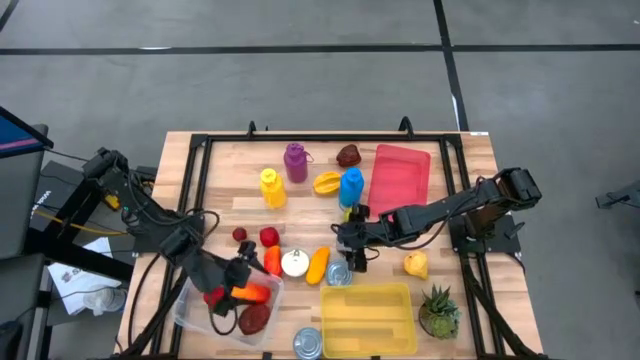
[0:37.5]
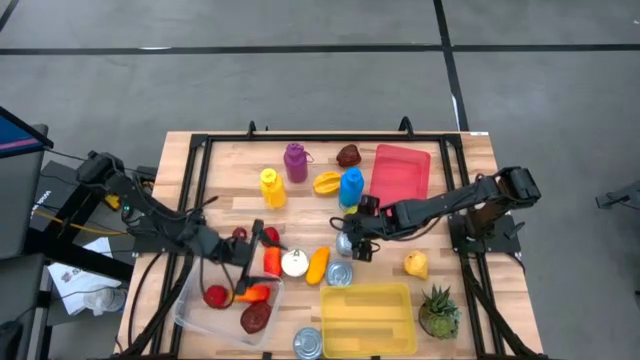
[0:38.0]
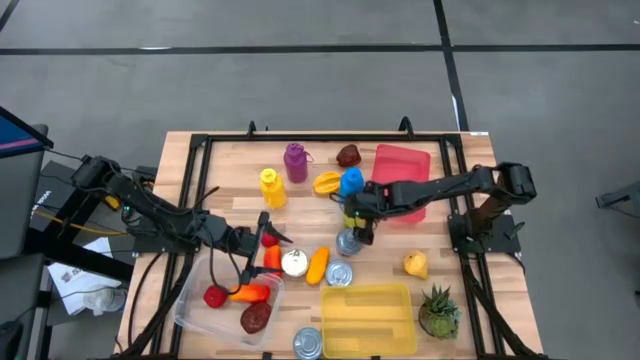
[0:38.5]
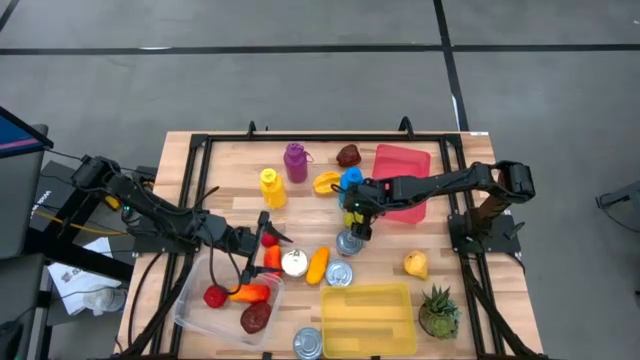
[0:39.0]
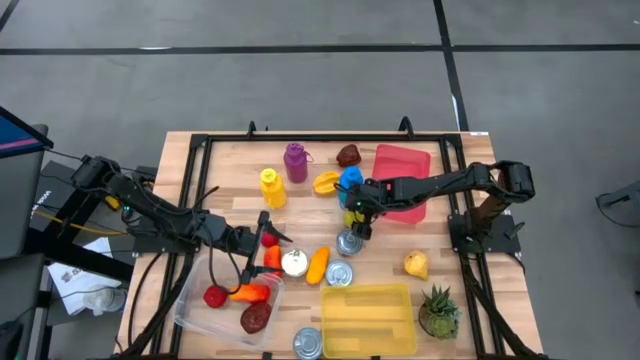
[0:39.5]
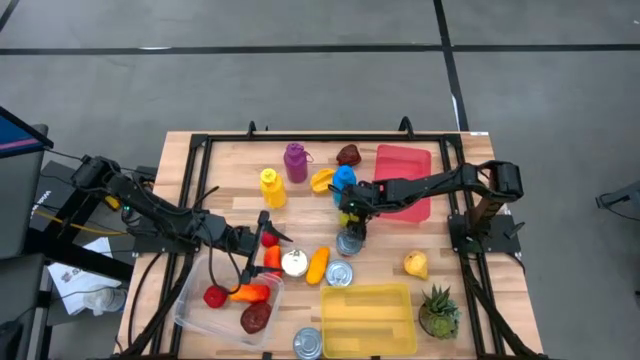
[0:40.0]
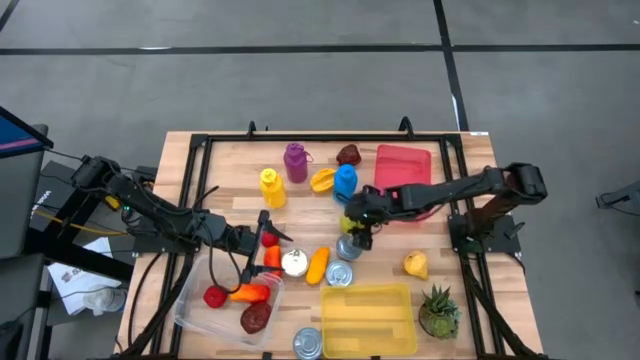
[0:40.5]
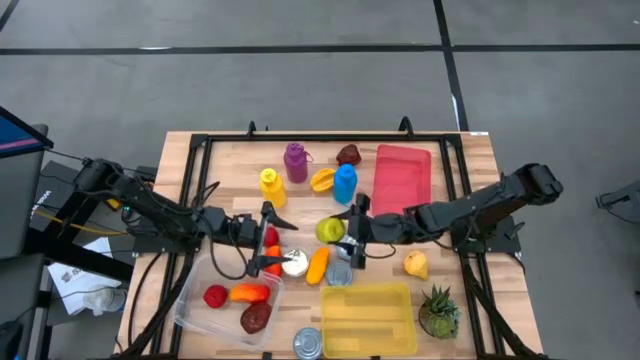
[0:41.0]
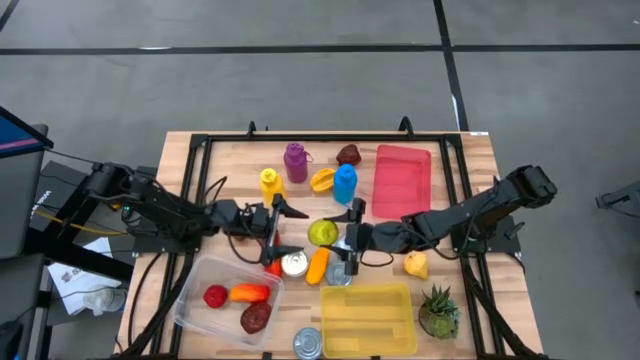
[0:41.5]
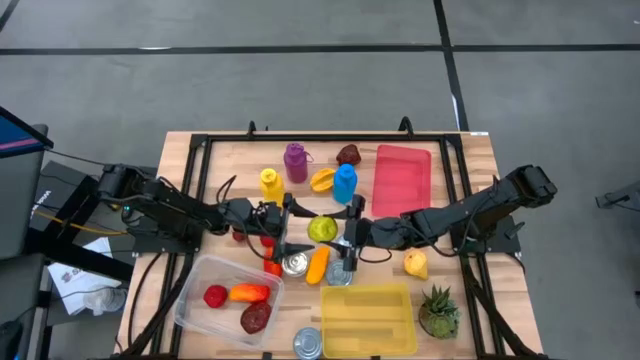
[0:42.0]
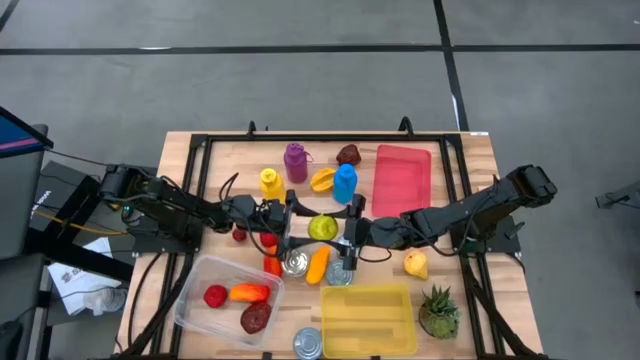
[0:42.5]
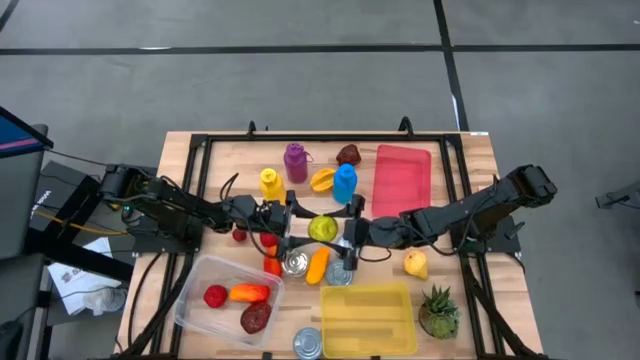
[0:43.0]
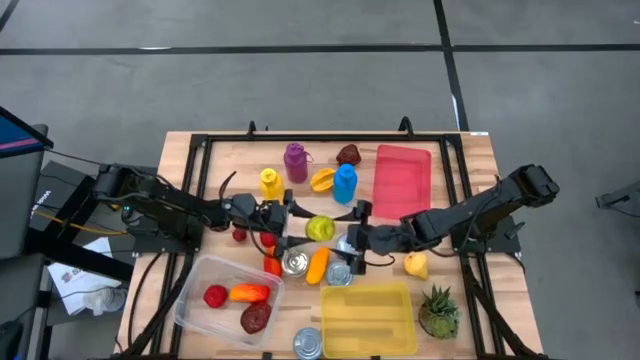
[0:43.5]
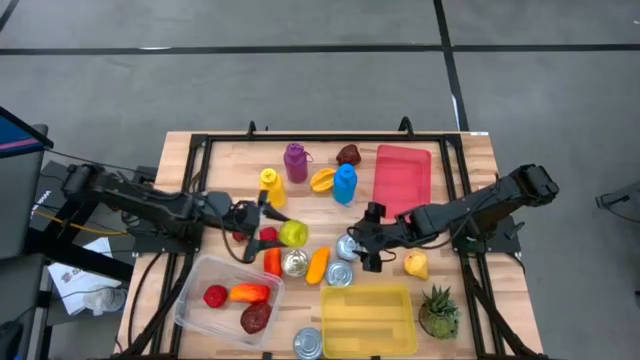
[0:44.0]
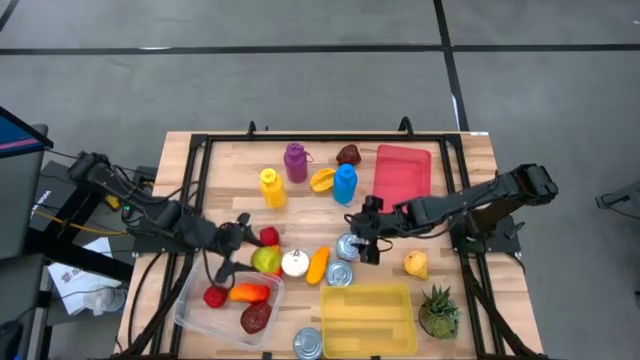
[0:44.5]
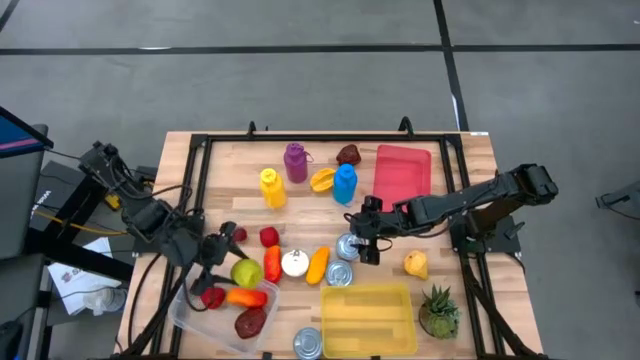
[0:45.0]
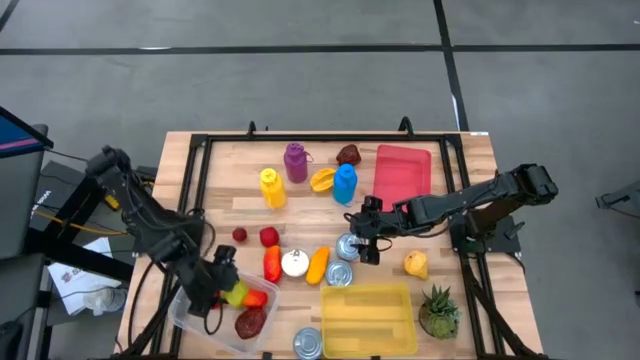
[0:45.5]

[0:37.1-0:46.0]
Task: Pick & Place Food Item
Put the green apple into the transparent bin

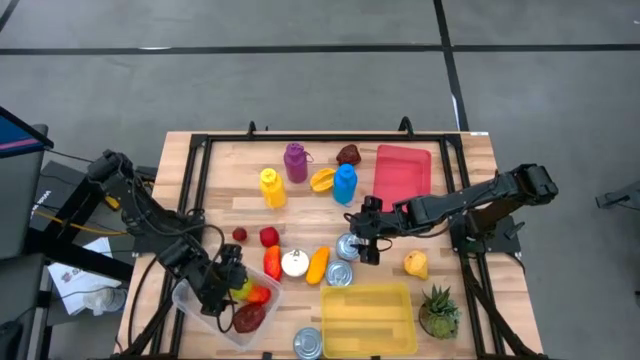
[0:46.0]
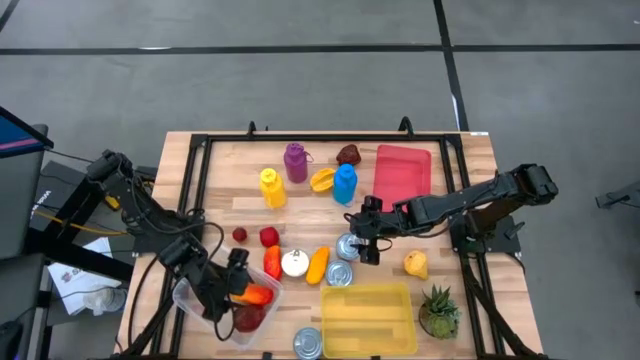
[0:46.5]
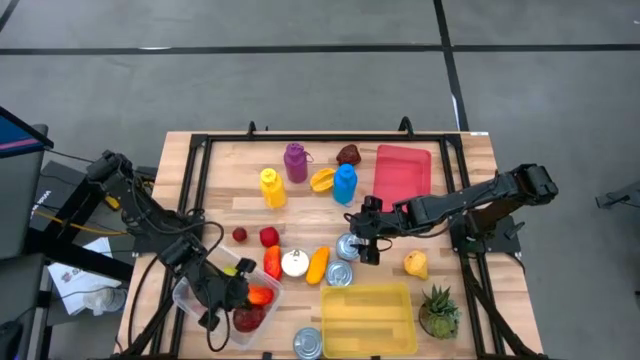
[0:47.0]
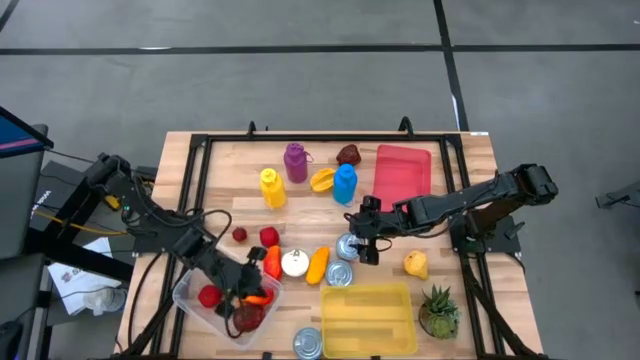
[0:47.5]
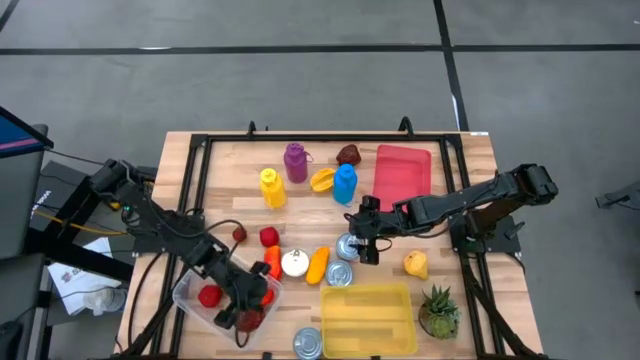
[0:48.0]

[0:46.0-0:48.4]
Adjust the transparent bin on the table

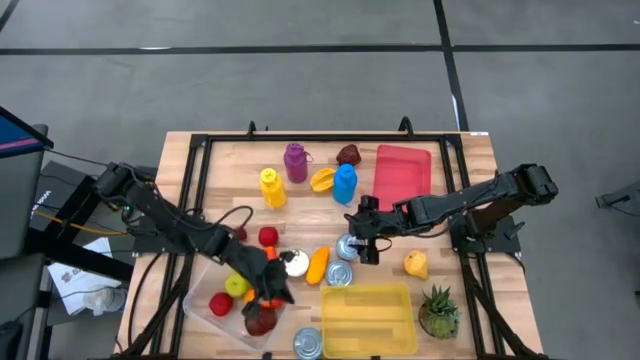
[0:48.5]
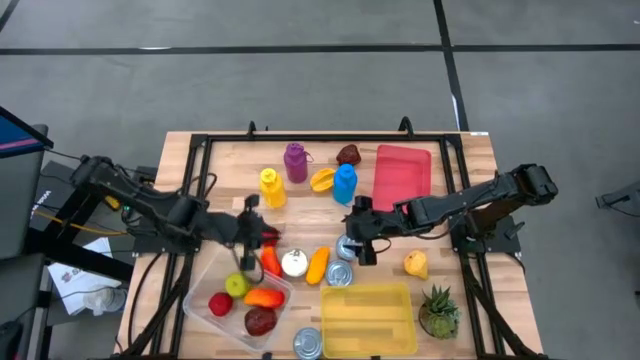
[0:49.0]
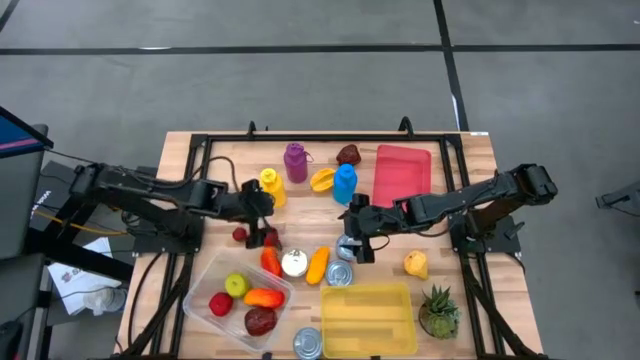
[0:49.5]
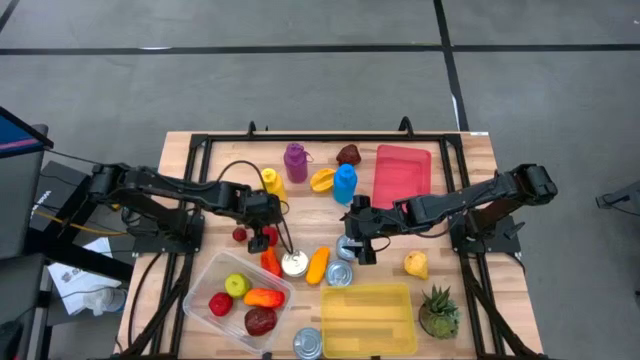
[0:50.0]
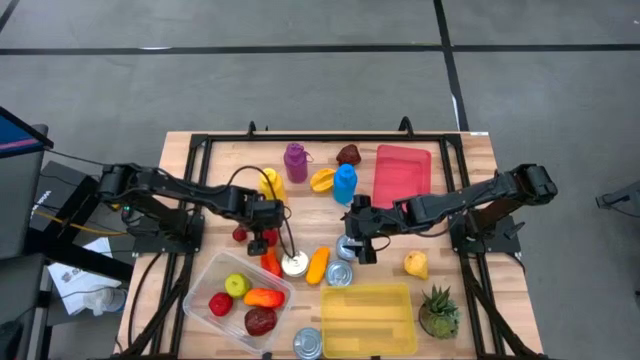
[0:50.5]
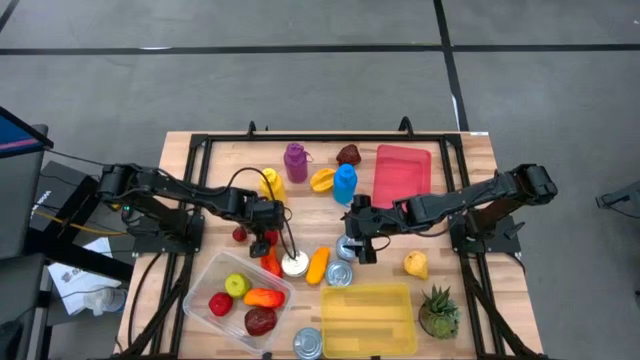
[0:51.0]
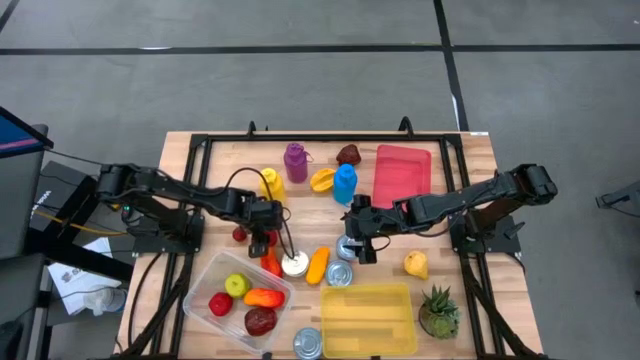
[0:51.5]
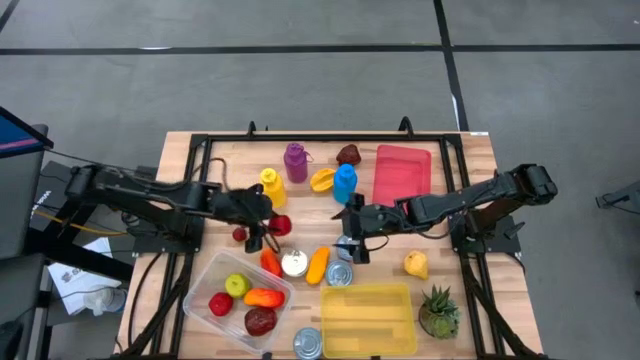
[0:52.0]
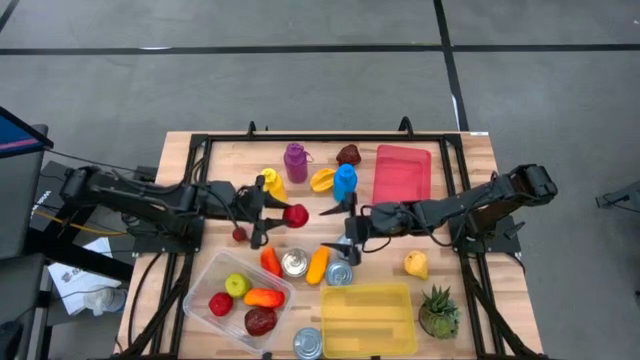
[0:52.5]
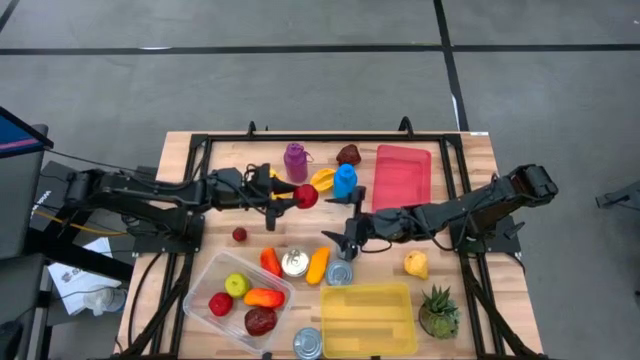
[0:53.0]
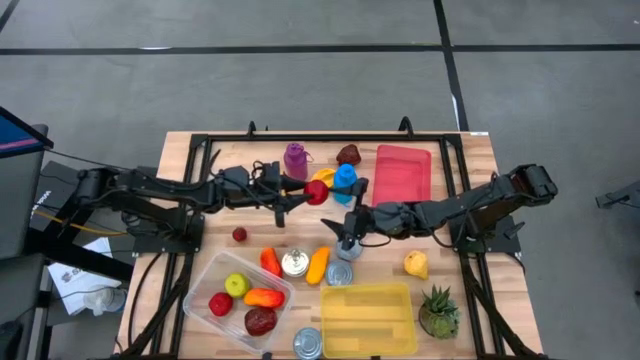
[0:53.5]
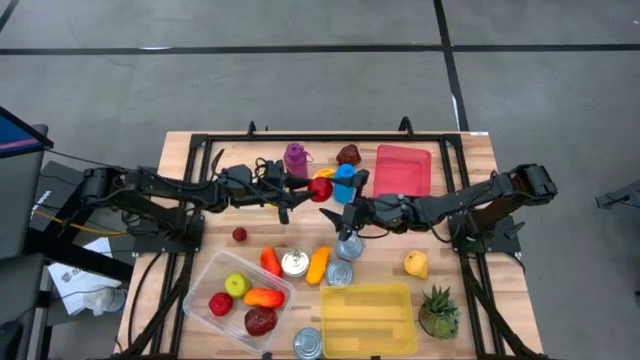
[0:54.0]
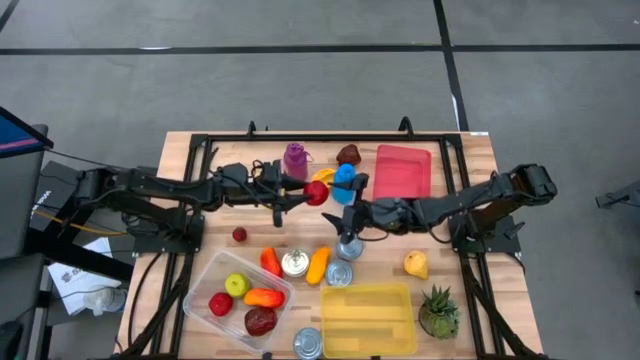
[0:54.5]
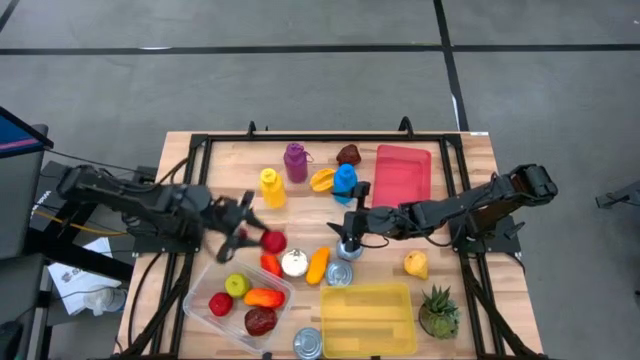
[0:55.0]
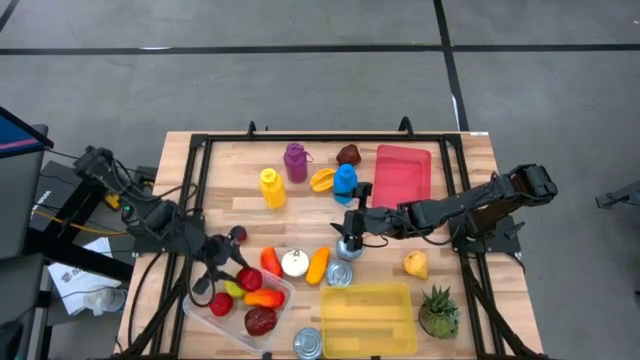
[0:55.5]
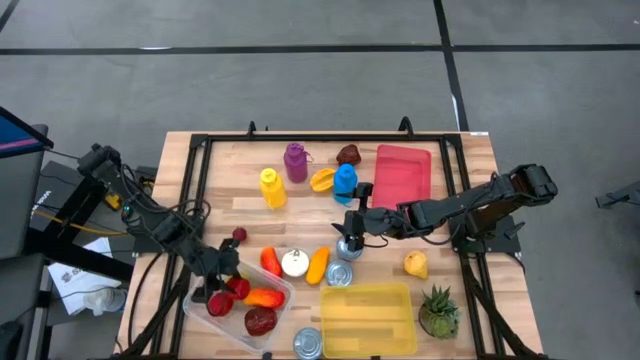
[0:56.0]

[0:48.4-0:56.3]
Put the red tomato into the transparent bin

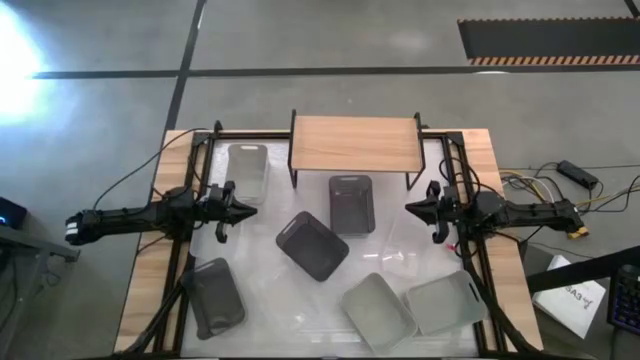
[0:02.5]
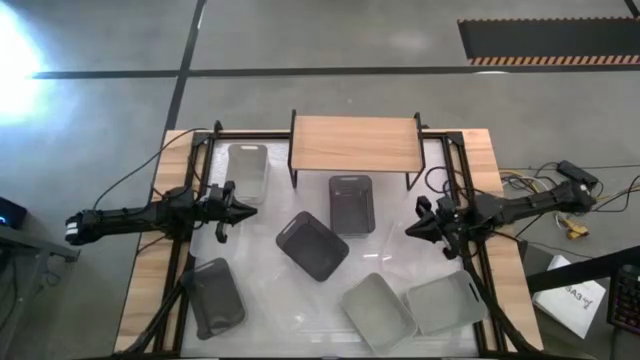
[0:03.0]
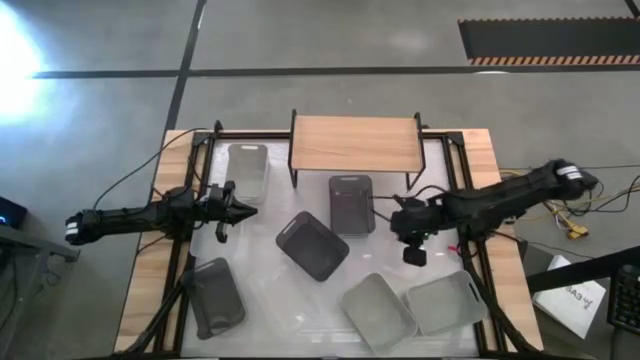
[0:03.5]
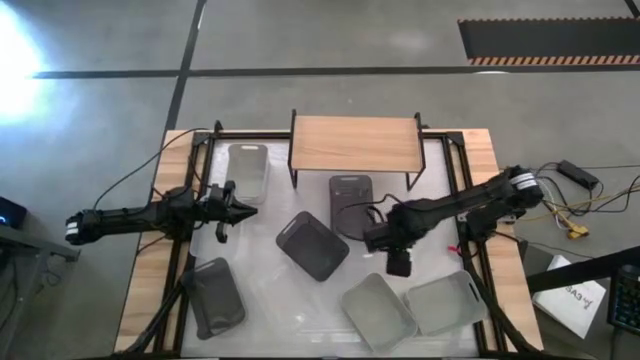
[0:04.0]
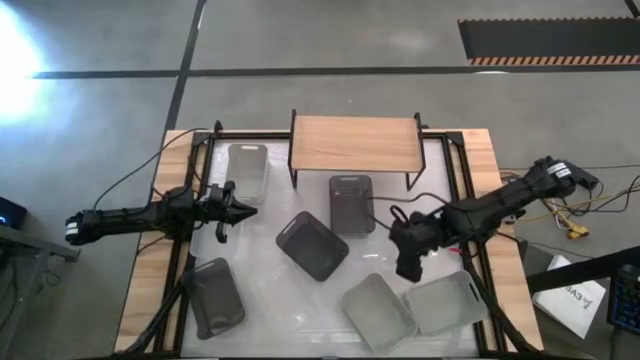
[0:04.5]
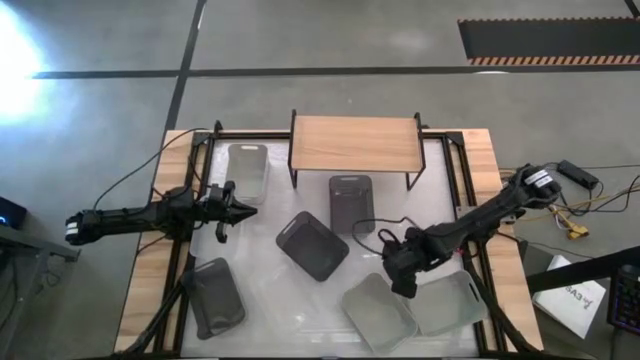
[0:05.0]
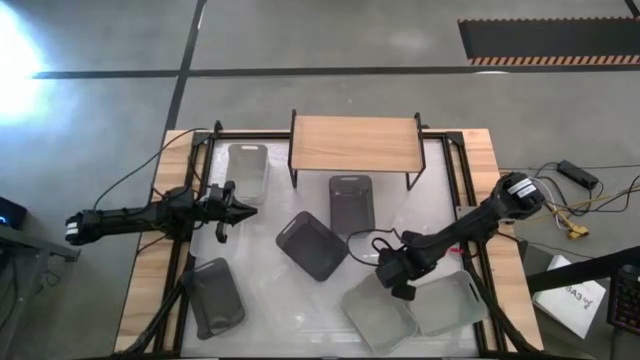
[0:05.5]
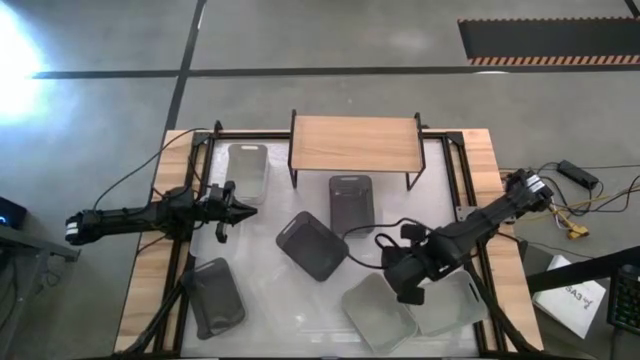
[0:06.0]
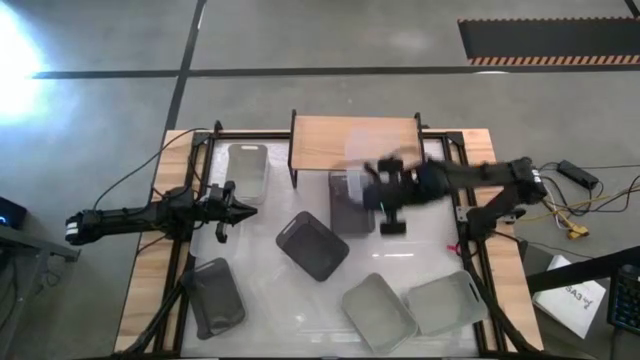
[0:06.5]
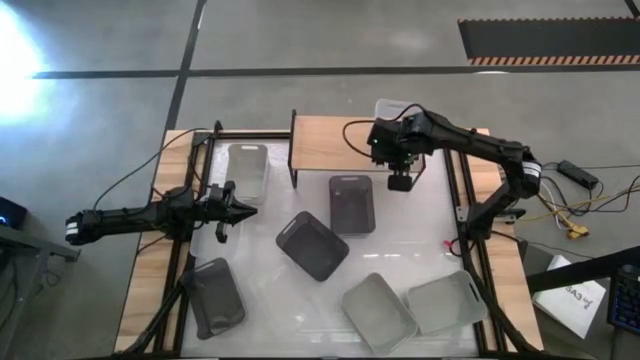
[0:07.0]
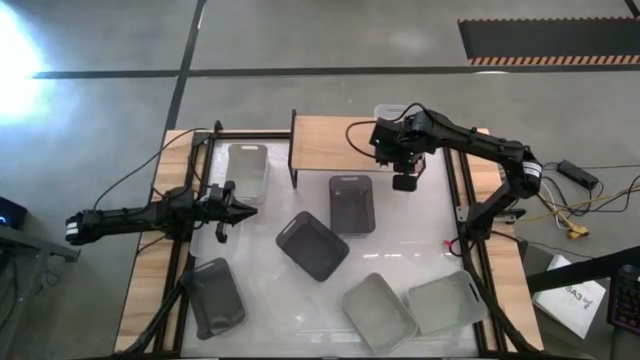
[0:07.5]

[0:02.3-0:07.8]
Task: Stack baskets on shelf by color
Put the top right transparent bin on the shelf
